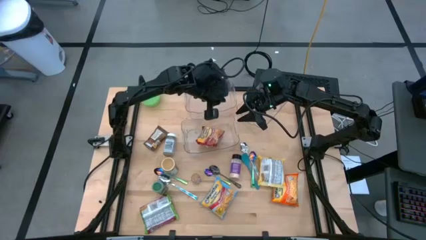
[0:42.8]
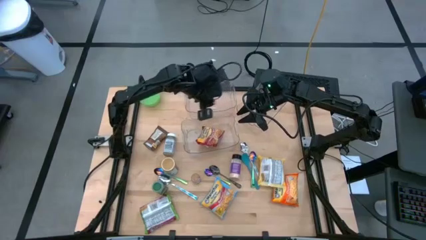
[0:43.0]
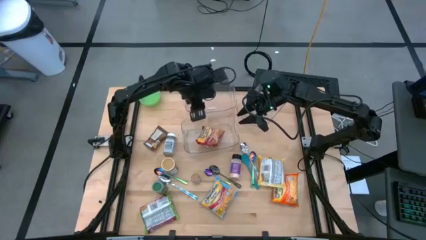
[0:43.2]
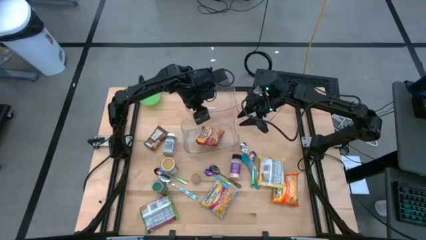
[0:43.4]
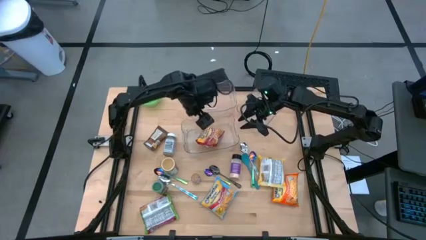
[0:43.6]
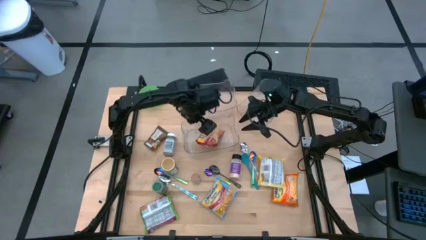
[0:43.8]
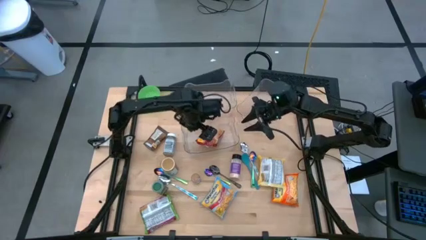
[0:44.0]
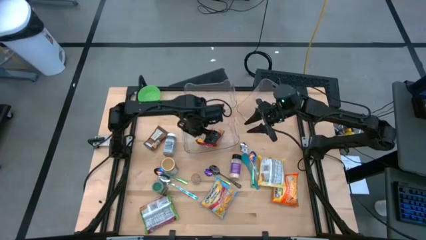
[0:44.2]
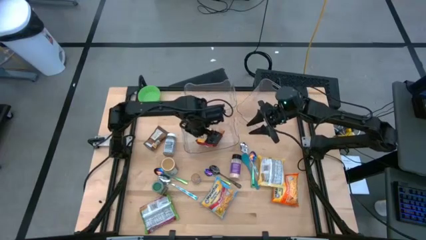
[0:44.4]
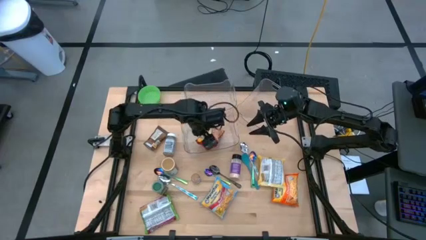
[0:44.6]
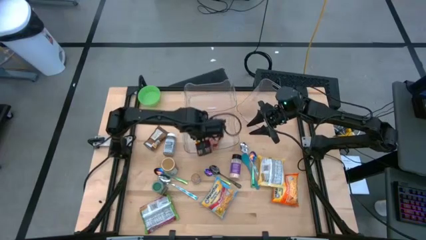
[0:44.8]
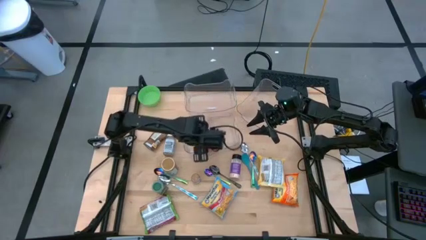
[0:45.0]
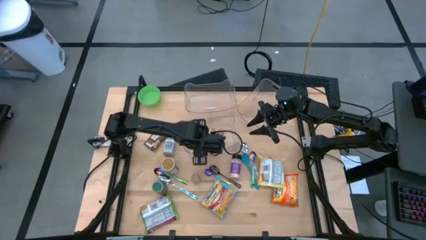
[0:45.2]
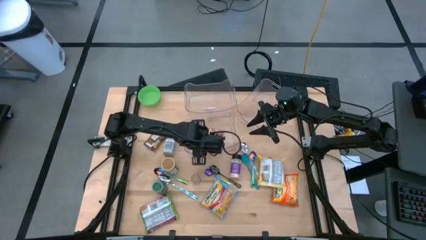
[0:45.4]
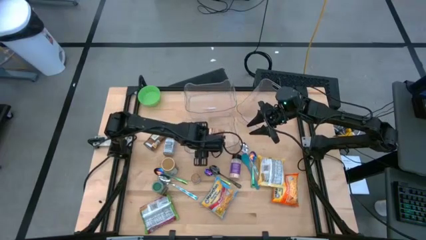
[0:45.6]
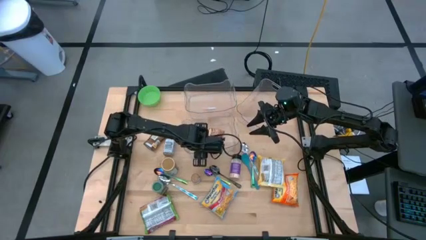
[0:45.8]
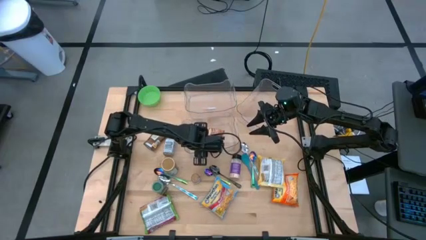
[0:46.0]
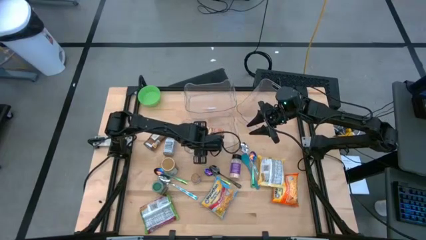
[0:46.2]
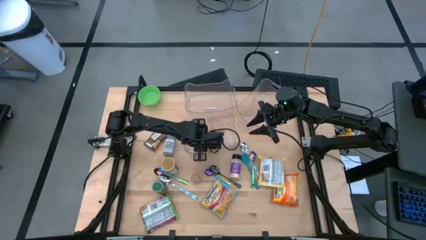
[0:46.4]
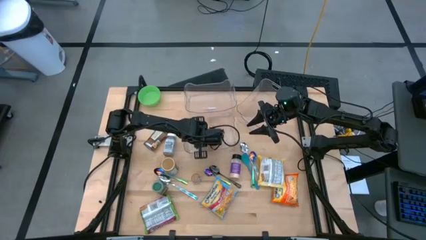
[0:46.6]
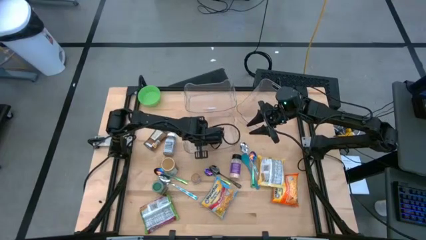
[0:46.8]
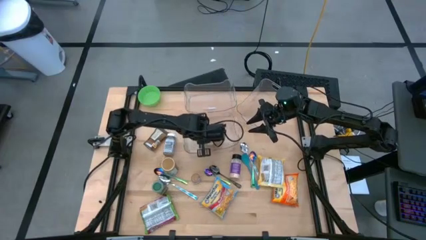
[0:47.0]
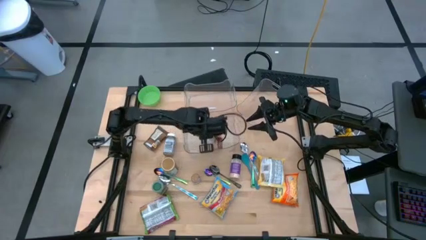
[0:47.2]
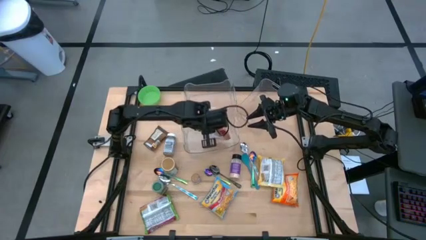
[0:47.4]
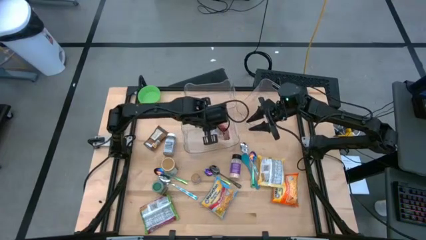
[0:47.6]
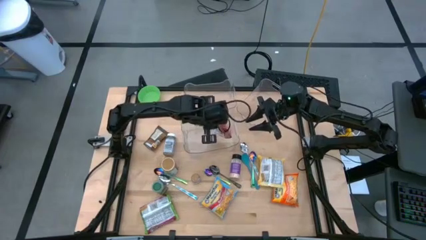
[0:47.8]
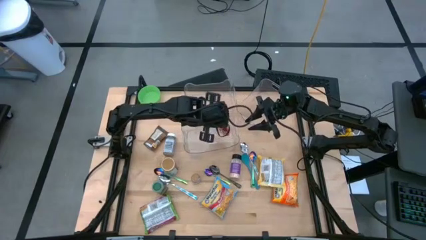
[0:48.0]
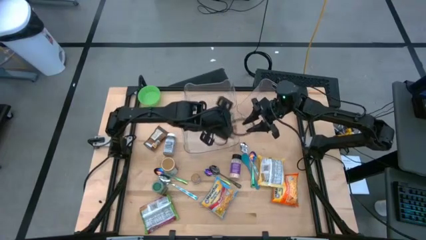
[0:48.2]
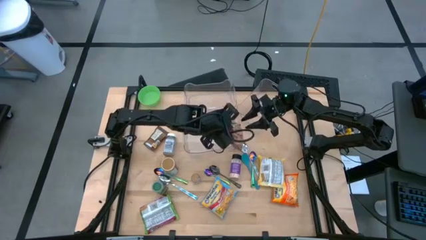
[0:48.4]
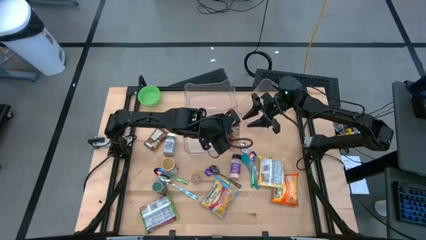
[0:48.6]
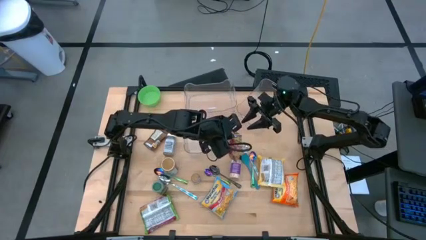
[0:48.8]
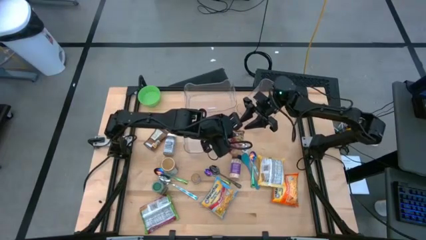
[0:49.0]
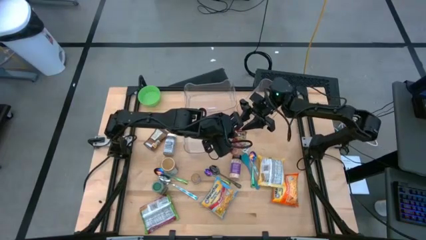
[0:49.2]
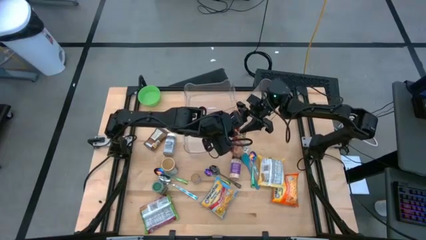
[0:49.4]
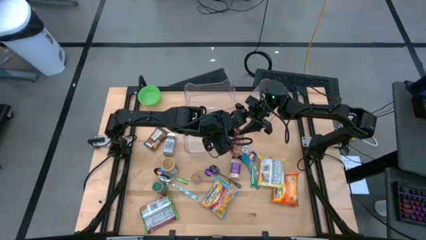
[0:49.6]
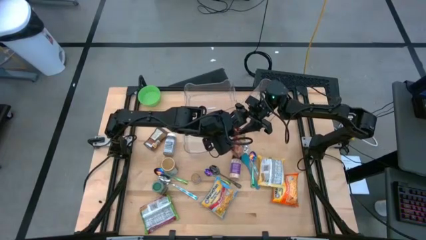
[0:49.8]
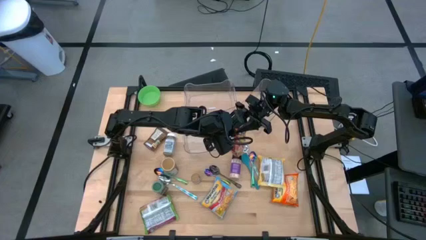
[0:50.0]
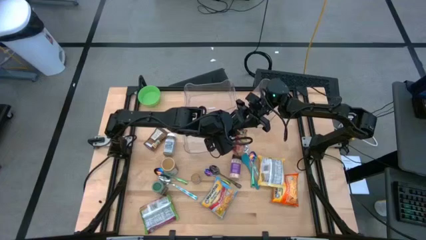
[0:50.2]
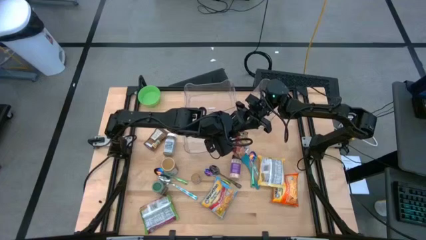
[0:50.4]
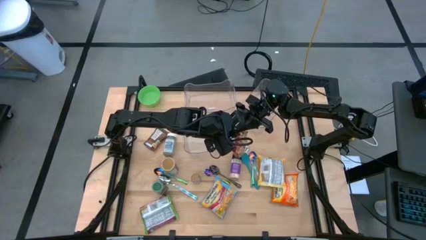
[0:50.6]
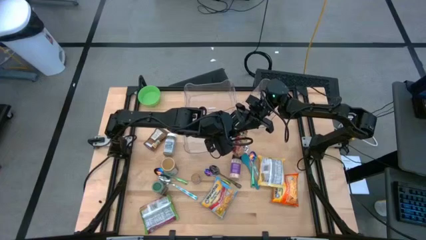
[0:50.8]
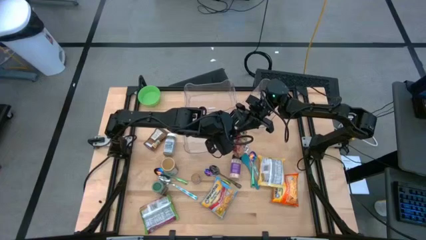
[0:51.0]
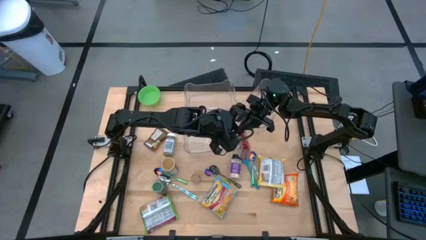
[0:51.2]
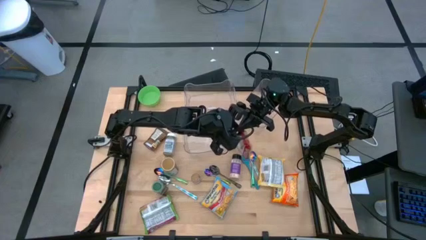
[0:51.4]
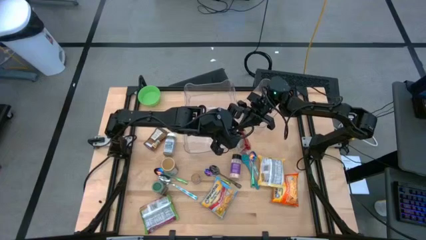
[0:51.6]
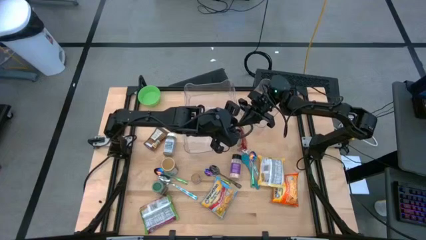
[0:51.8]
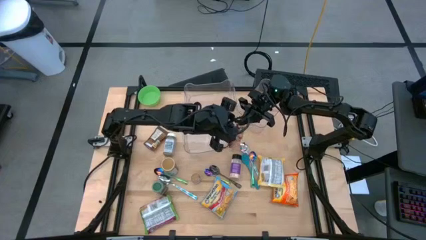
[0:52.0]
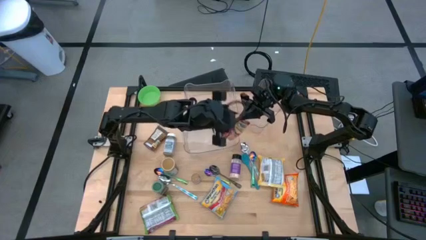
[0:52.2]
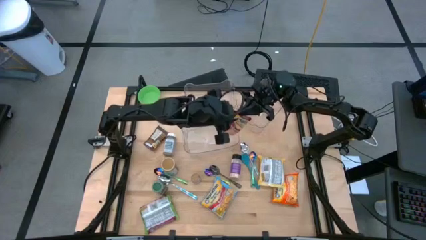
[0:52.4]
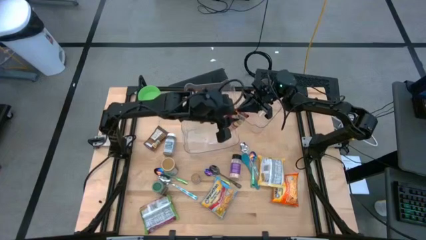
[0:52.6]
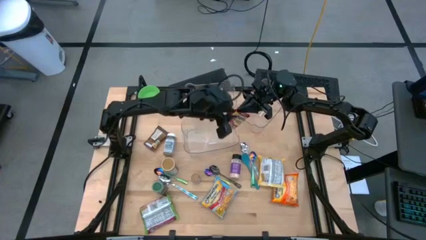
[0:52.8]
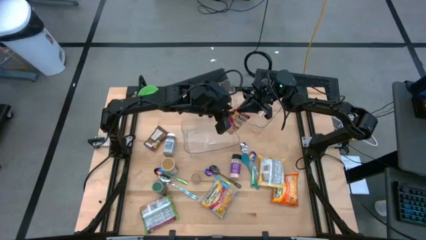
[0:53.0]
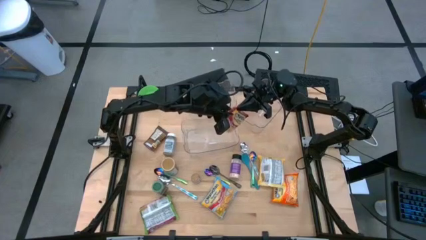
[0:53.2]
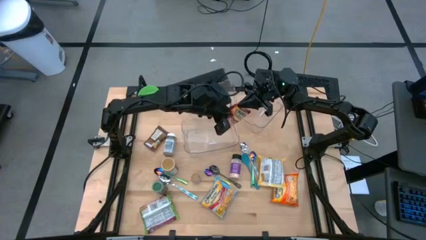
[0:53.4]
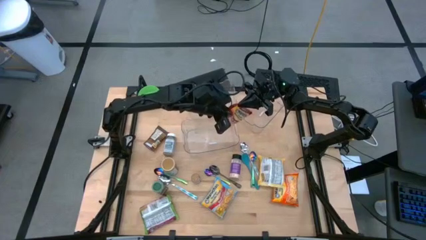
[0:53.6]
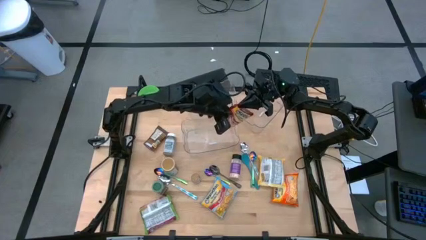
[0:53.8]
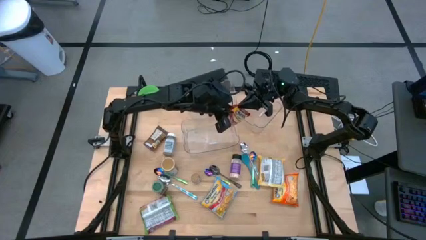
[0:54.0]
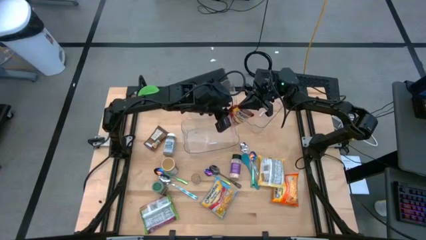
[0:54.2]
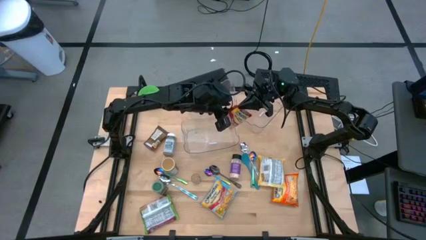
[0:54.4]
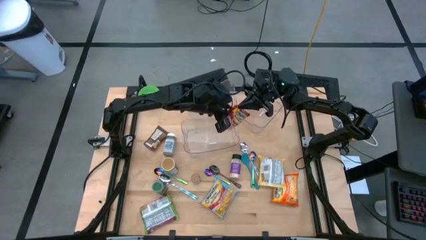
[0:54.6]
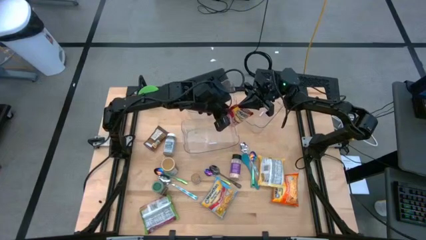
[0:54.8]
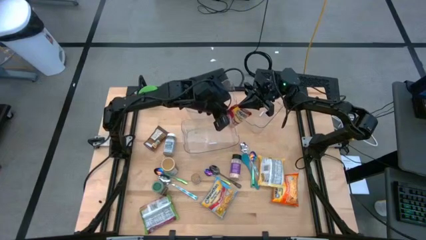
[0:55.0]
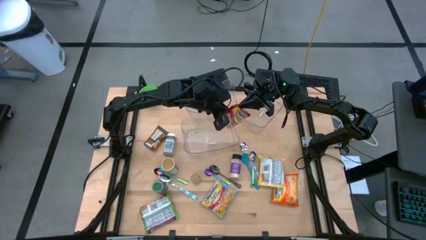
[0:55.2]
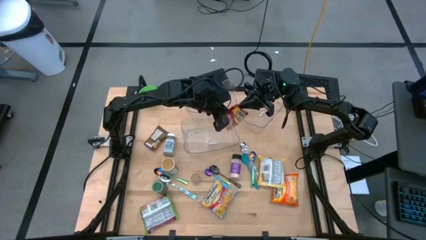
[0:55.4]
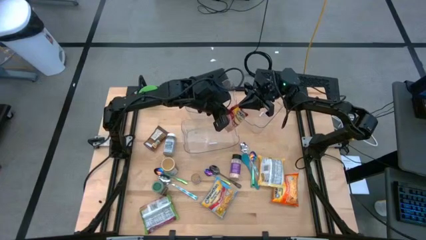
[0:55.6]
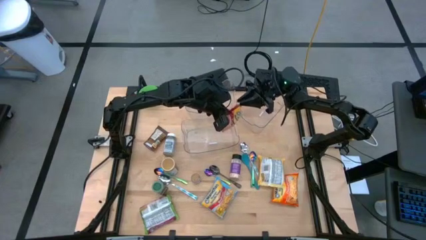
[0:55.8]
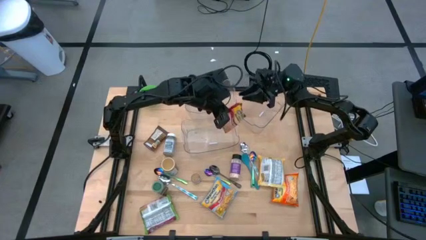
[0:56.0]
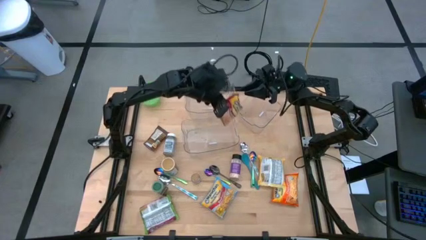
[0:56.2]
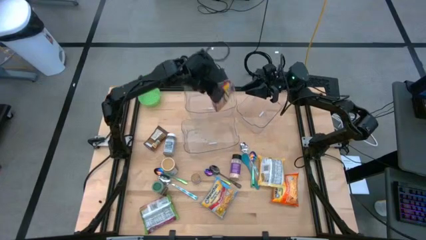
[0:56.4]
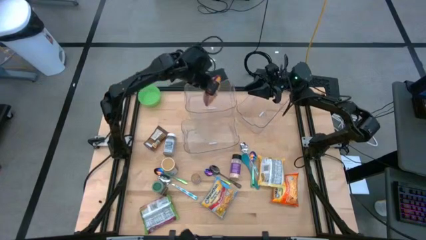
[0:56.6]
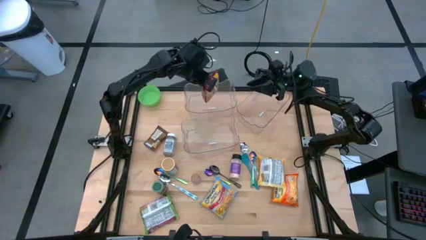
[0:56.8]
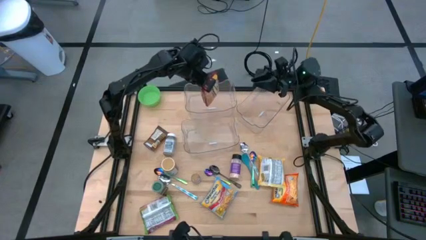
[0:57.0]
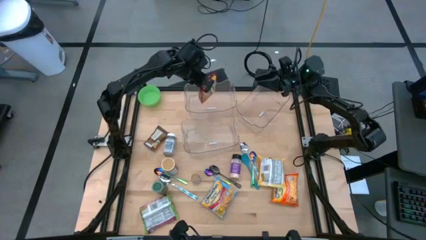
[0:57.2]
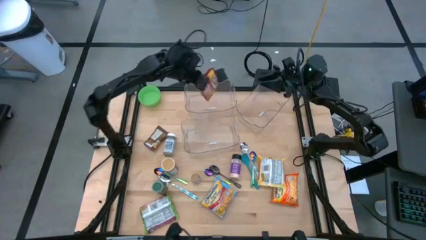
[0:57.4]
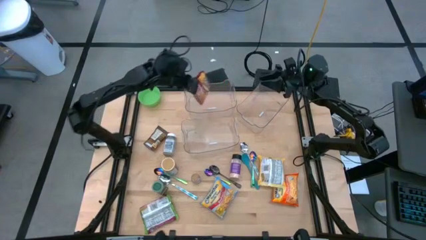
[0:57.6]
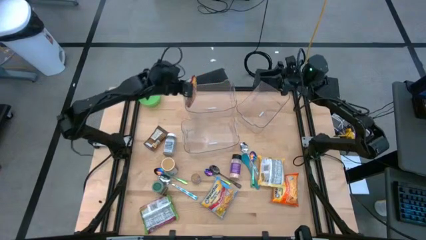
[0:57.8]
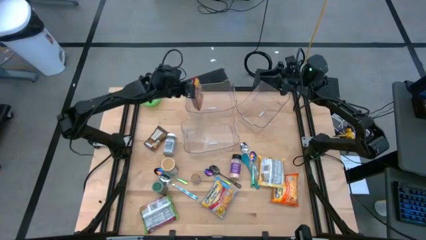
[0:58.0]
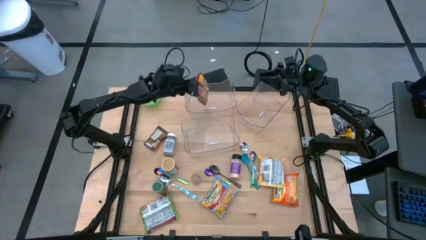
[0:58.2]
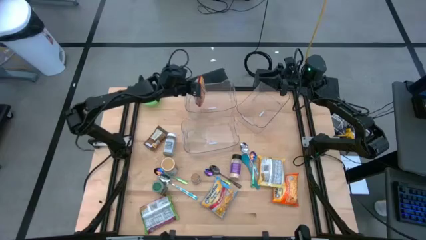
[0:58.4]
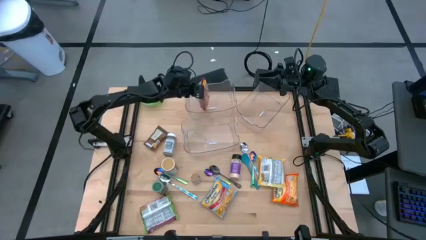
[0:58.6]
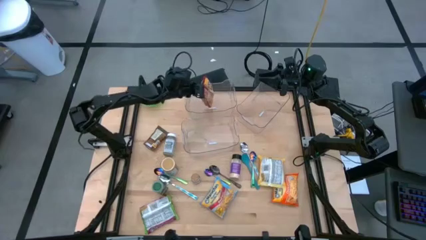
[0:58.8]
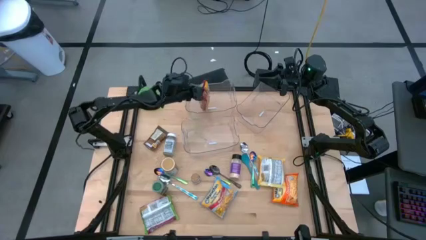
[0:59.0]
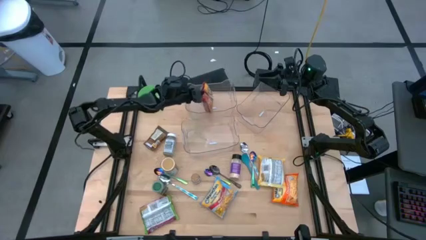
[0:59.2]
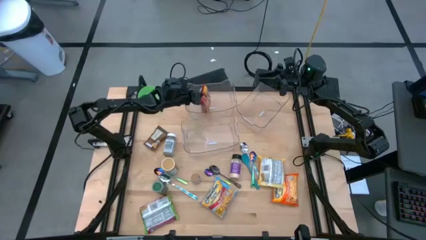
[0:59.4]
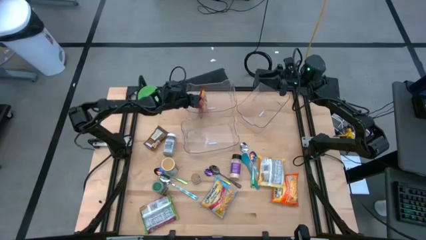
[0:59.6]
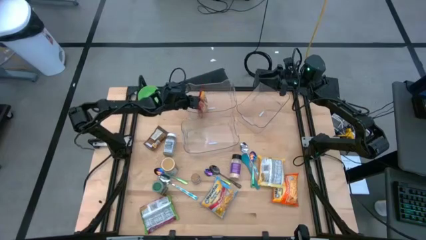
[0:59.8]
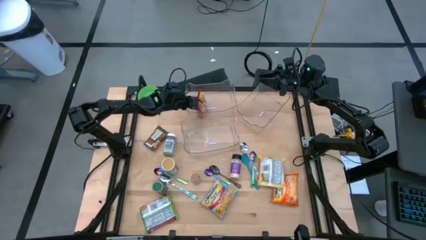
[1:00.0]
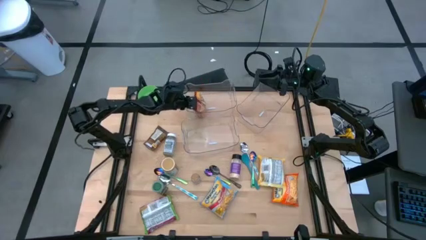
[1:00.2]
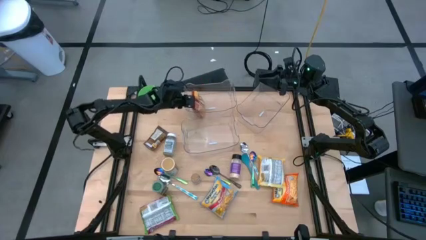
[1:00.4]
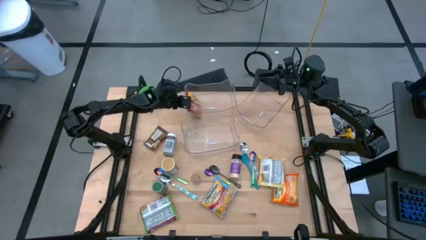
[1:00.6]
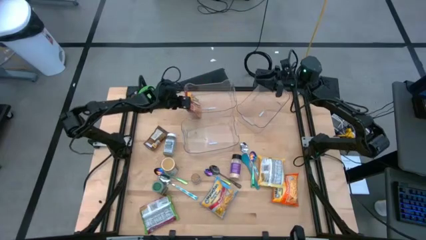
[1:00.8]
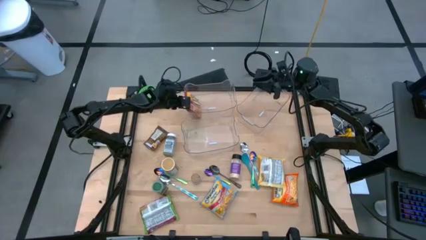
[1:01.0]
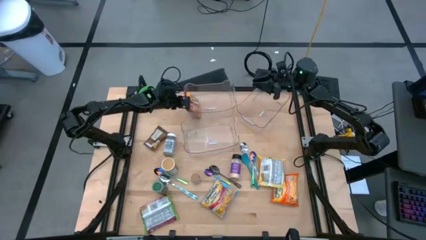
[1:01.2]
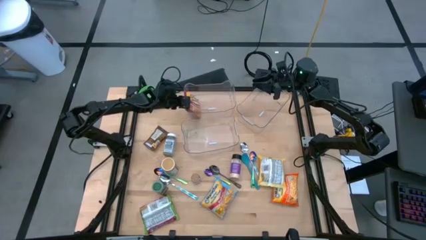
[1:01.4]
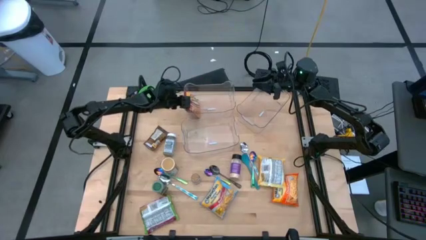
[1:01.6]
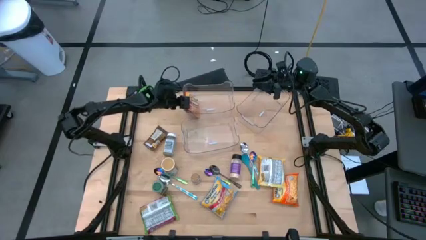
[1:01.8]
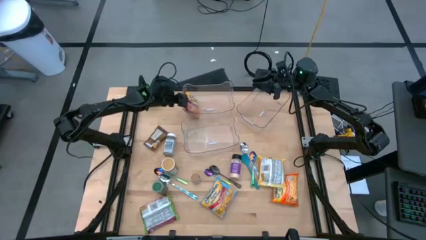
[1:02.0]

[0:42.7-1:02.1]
Task: Pick & Place Food Item
Put the red noodle pack into the top left transparent bin
